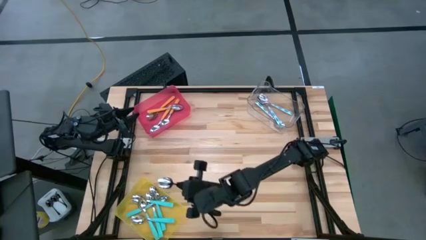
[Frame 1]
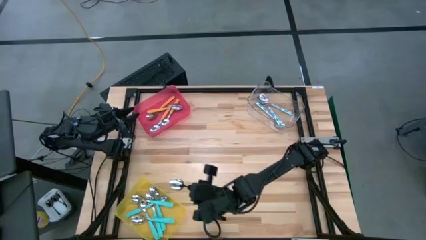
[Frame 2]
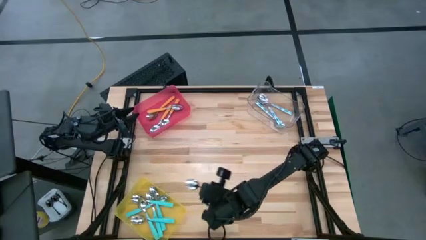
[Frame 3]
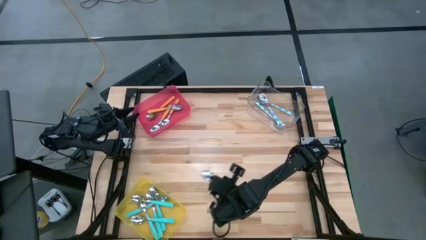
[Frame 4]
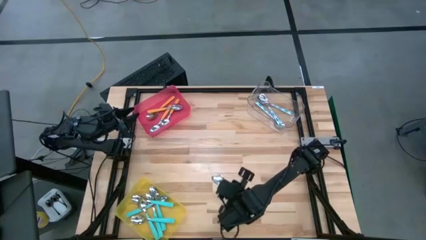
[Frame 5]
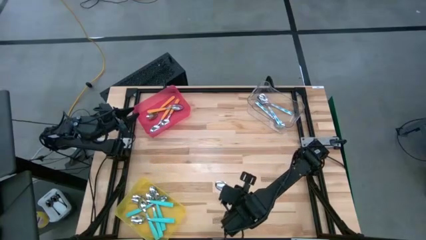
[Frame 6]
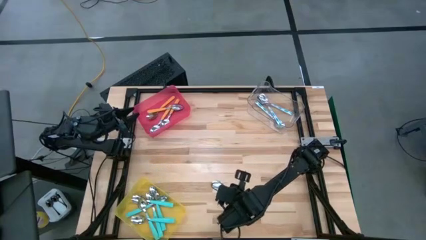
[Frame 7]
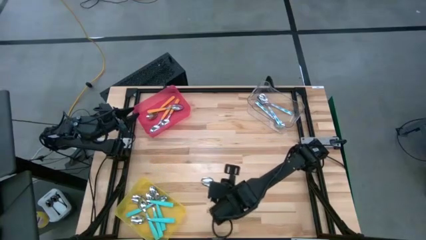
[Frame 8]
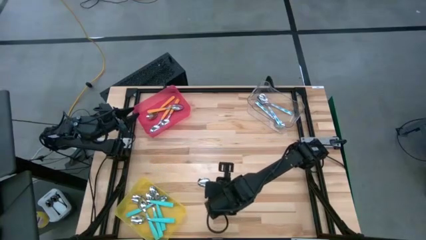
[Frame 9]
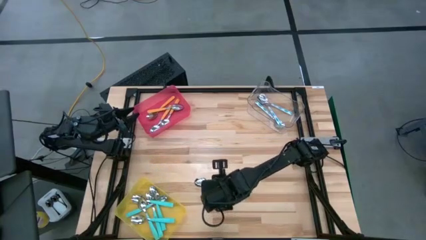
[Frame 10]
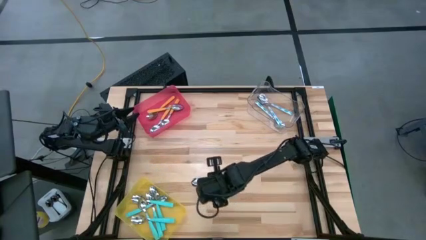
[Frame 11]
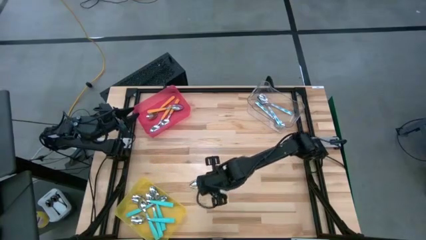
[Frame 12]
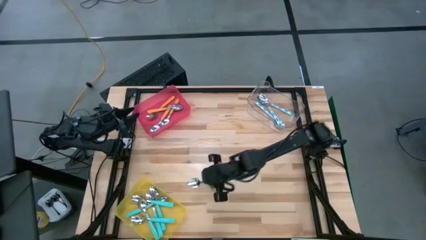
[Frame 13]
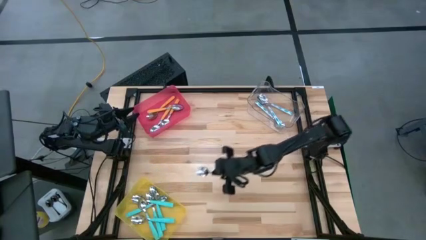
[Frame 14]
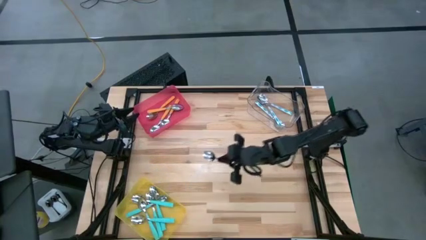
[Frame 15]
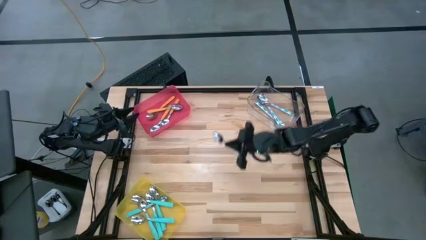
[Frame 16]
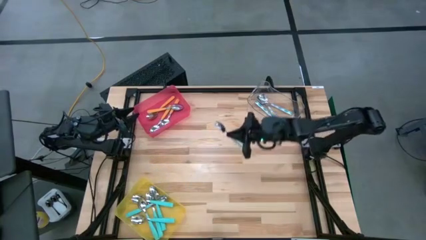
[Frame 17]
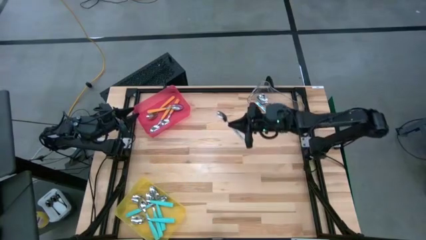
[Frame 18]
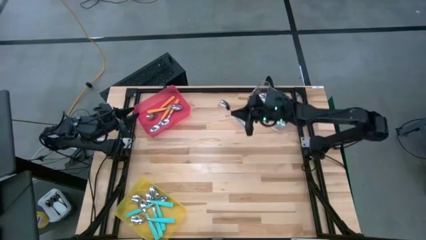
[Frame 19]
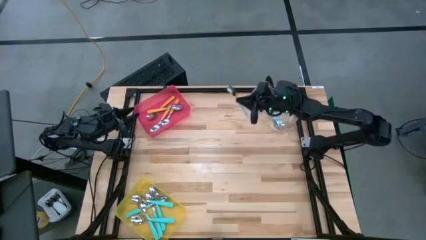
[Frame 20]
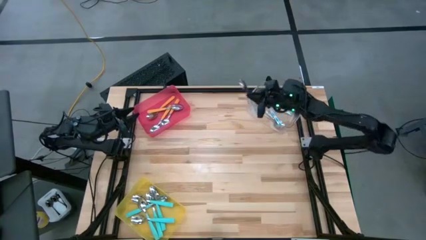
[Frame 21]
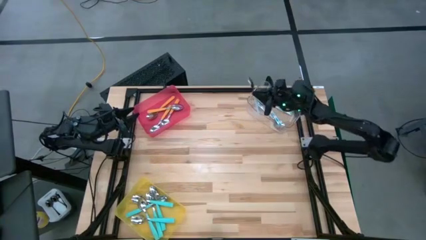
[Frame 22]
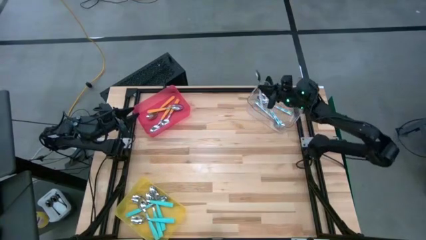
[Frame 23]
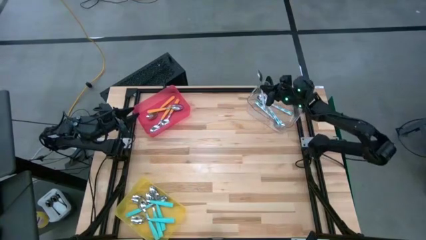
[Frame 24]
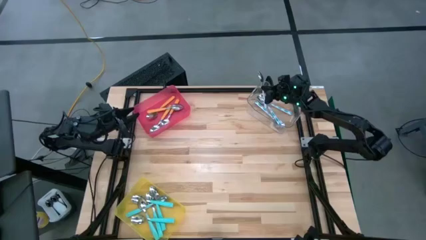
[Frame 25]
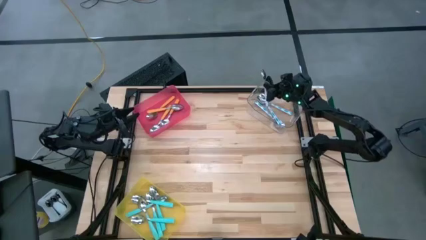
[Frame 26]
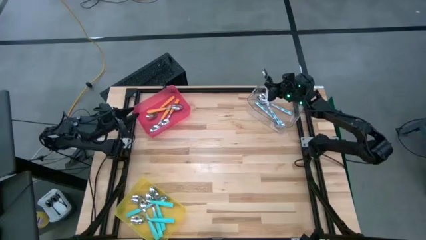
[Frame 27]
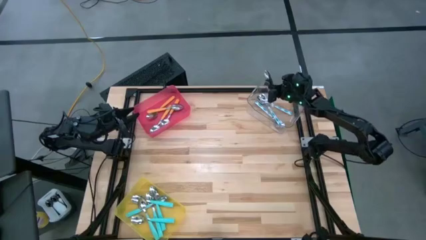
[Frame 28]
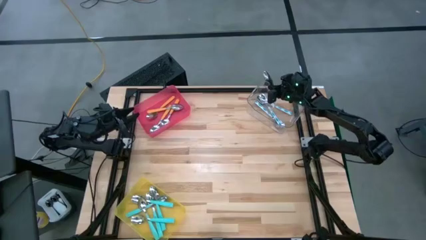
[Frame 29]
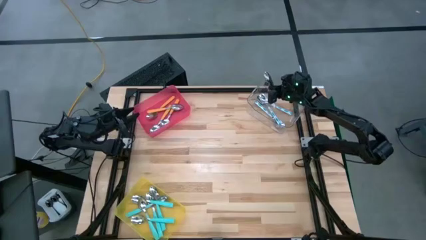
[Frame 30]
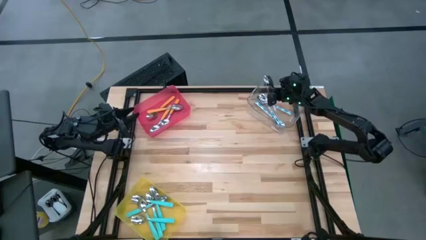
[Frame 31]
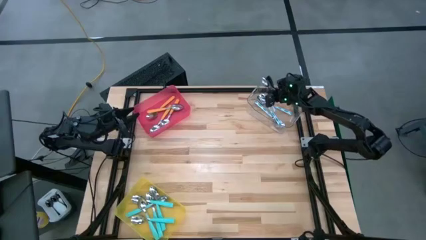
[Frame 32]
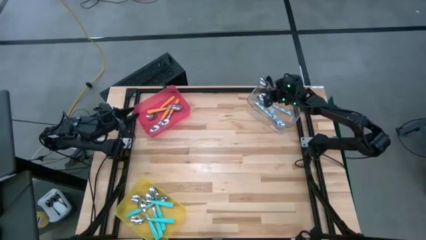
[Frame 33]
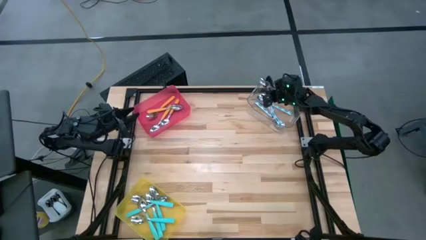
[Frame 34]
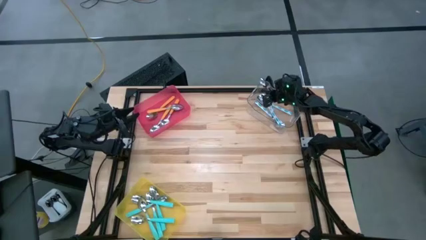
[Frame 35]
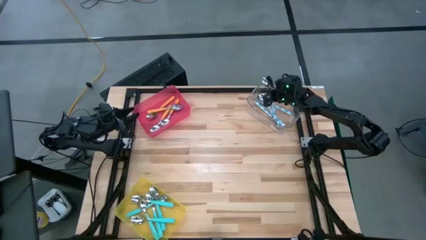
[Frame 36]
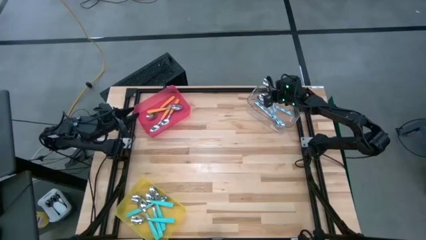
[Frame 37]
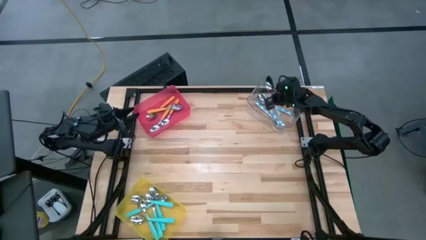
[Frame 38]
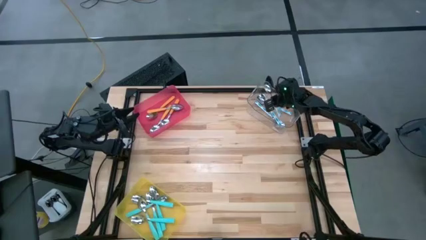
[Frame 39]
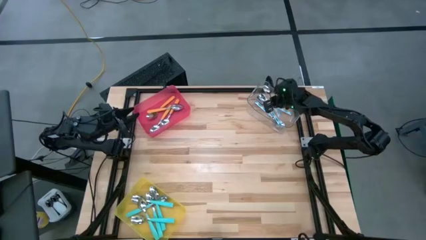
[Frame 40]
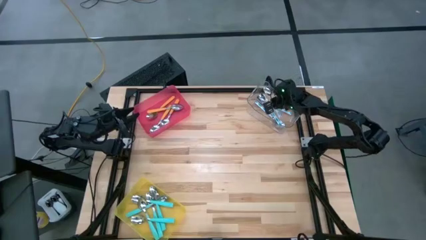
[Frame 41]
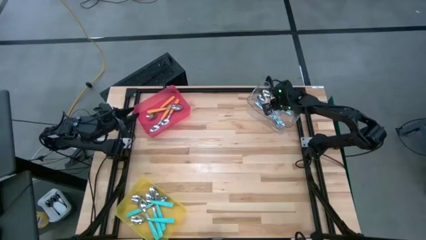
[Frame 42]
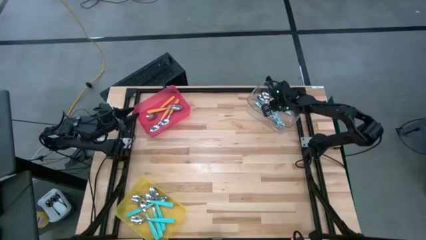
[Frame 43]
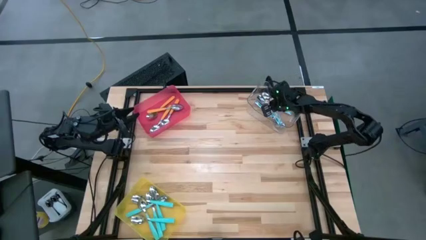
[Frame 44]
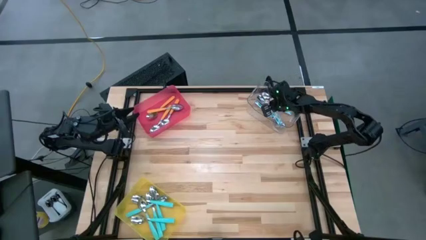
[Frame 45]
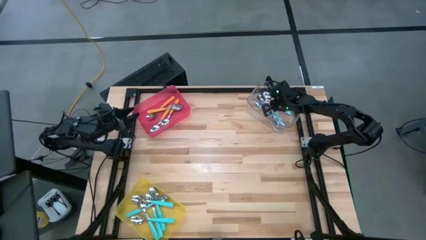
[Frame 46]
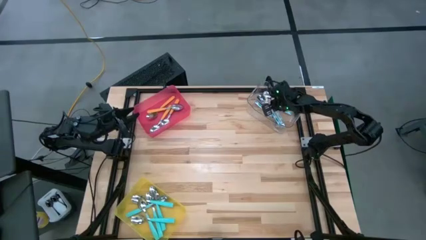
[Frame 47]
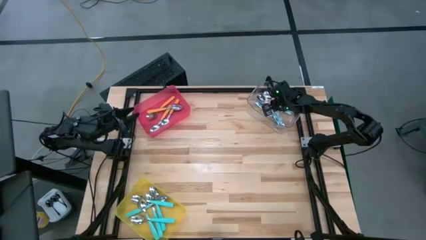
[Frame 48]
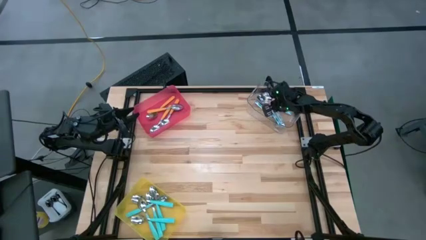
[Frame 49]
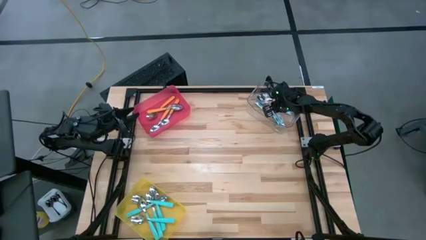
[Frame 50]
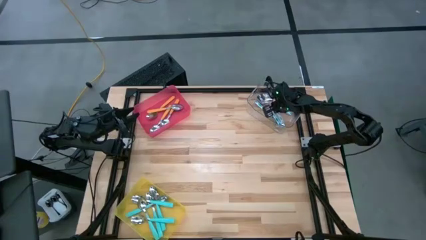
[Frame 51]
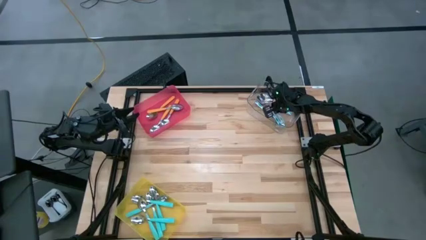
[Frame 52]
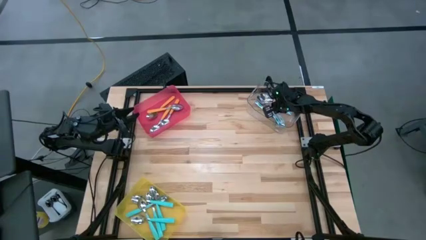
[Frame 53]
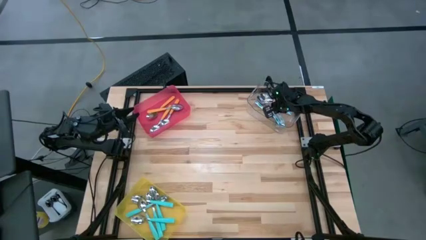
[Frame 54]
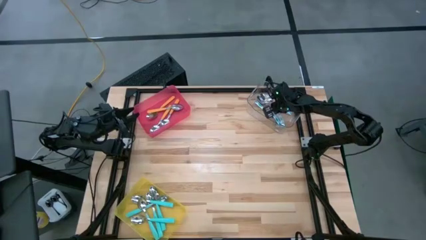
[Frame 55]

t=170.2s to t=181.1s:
Task: Sort silverware by color (type)
Put the patterned blue spoon into the transparent bin

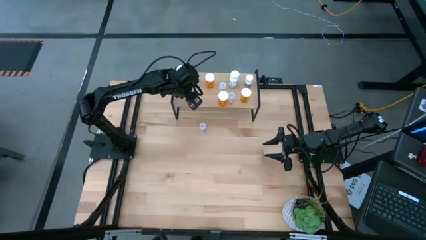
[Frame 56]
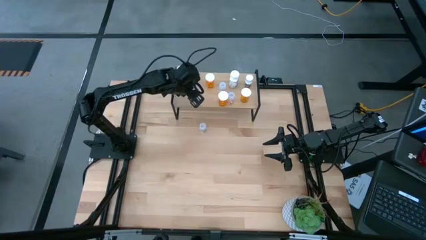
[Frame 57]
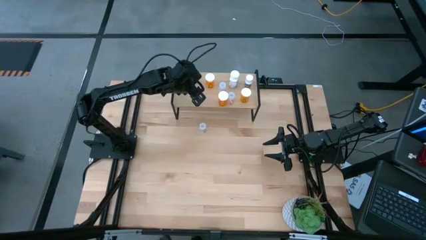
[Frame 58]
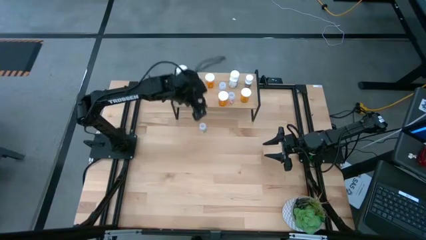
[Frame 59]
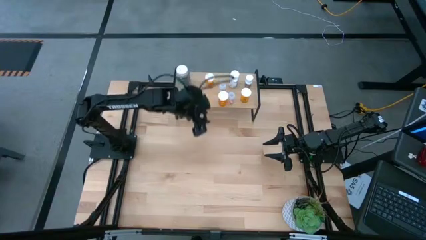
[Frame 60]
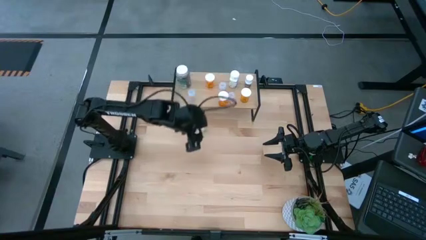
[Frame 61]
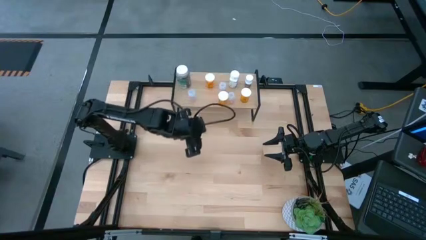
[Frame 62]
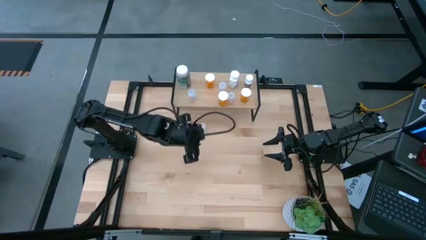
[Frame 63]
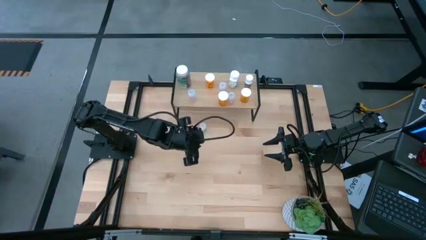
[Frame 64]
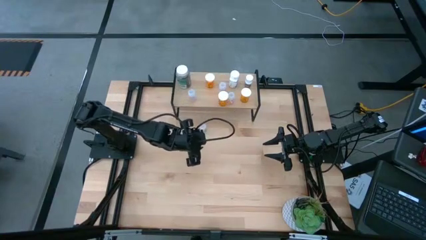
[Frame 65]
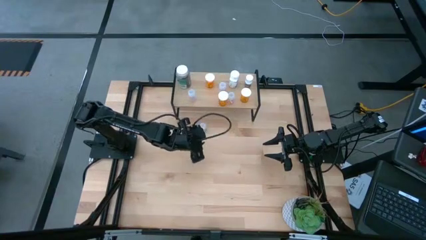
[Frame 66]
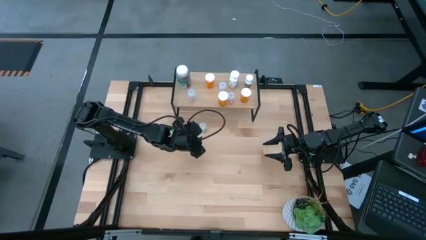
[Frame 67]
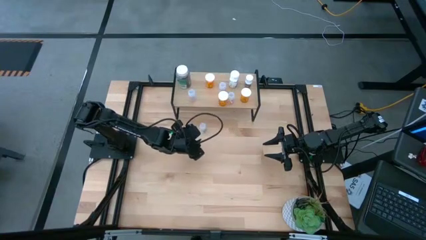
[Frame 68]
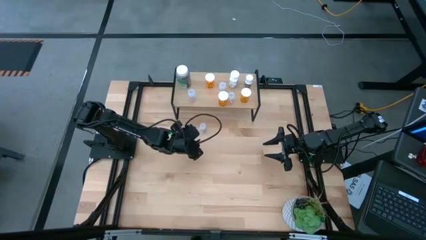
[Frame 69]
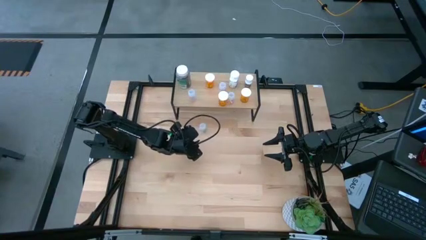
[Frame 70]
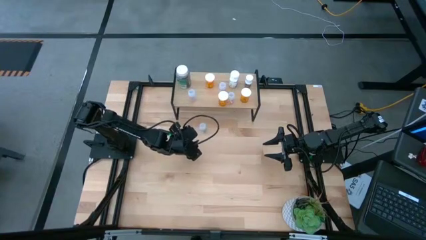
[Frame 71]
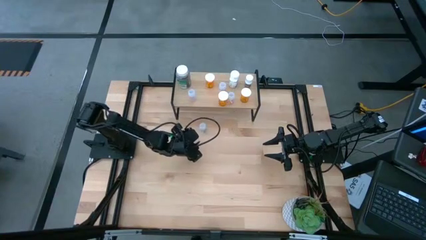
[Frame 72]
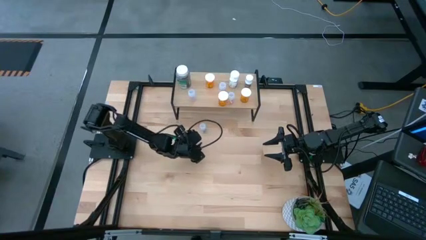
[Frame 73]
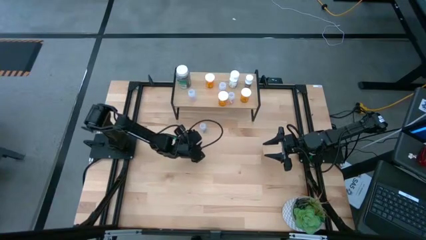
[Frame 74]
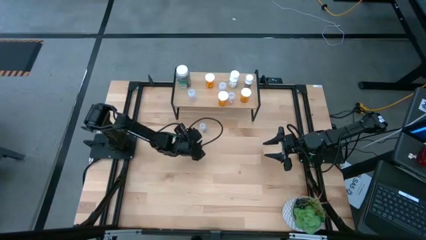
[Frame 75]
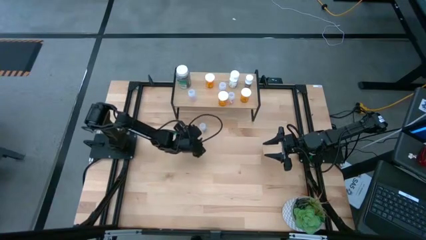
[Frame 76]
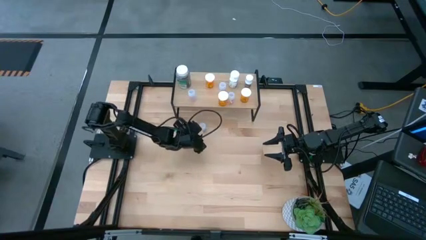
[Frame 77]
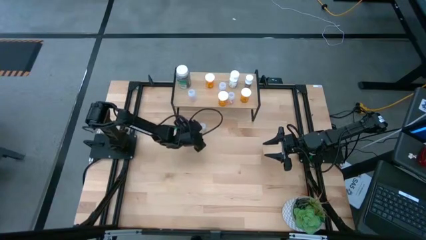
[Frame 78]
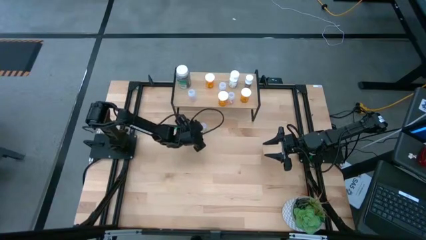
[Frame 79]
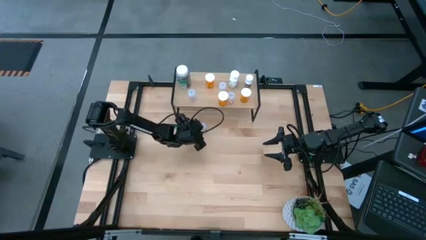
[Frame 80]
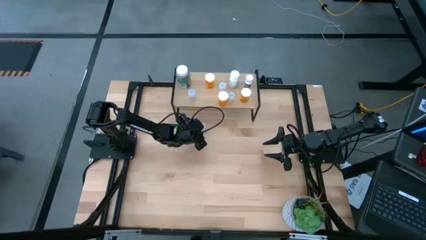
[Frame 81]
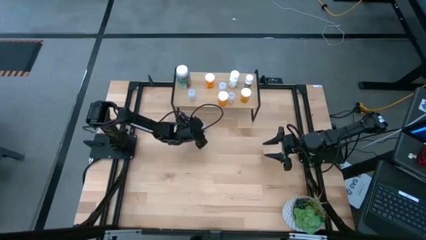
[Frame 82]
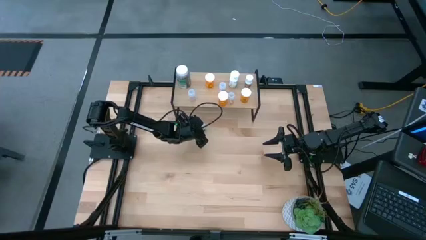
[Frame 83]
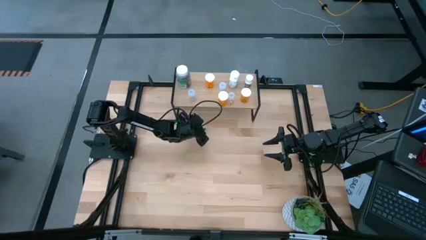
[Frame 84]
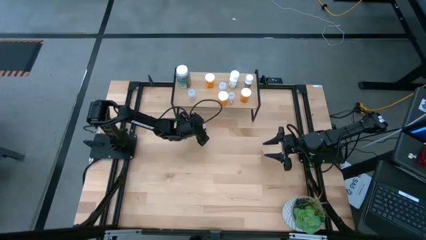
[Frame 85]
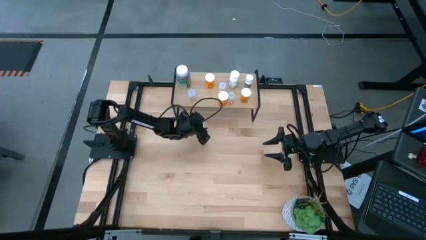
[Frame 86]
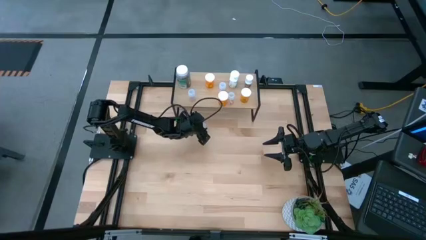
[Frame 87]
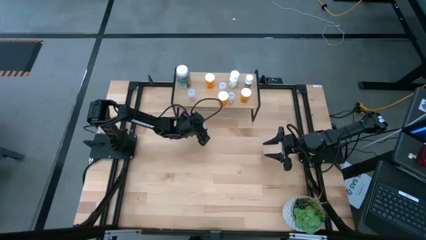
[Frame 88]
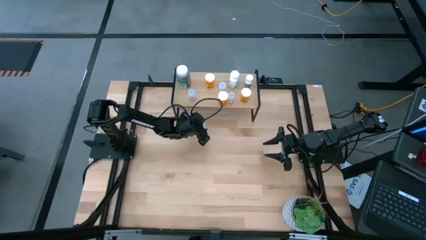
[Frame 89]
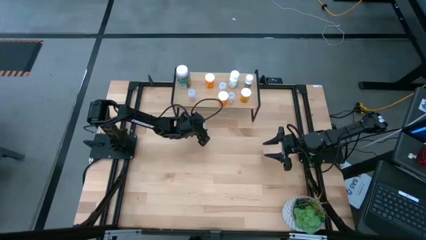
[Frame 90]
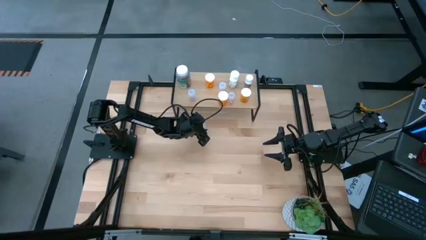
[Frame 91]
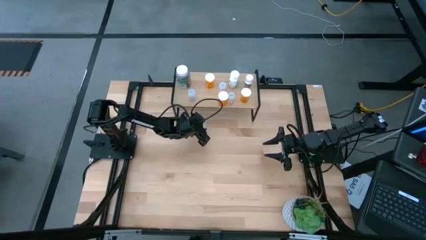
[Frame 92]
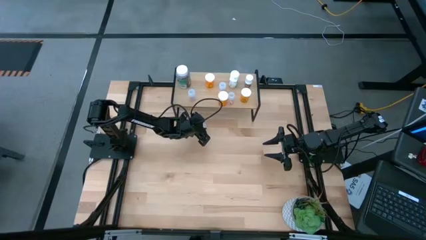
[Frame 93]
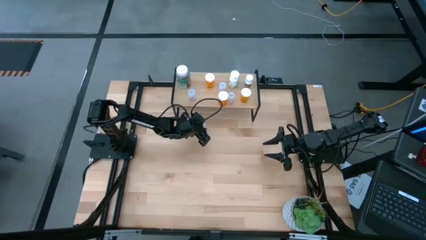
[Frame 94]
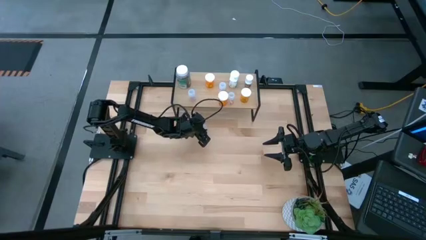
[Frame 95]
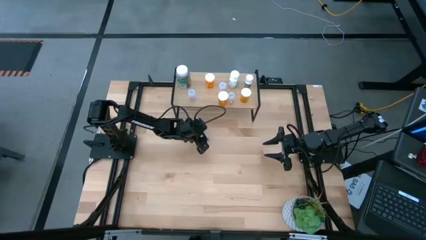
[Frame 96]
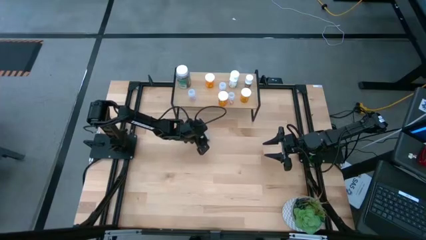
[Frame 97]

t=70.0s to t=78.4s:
Task: Pick and place medicine bottles onto shelf by color
Put the pill bottle on the shelf
